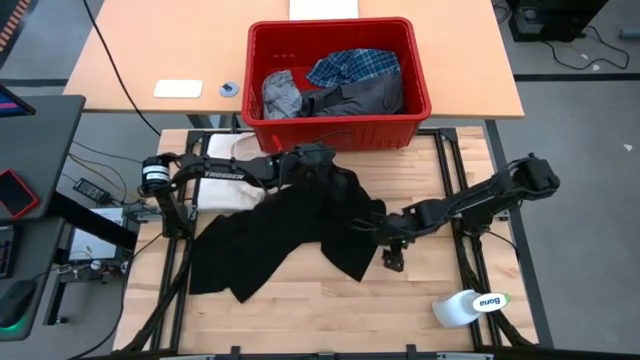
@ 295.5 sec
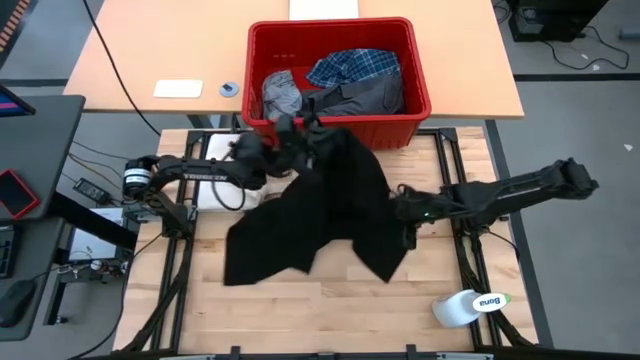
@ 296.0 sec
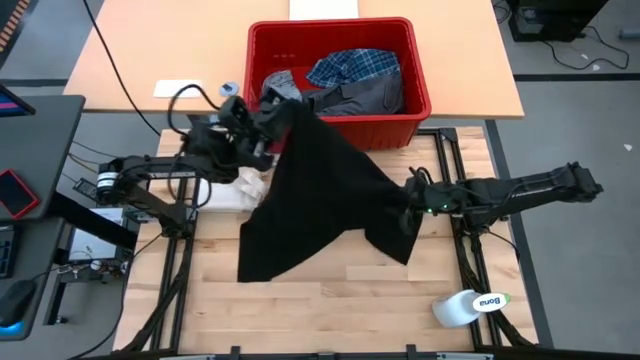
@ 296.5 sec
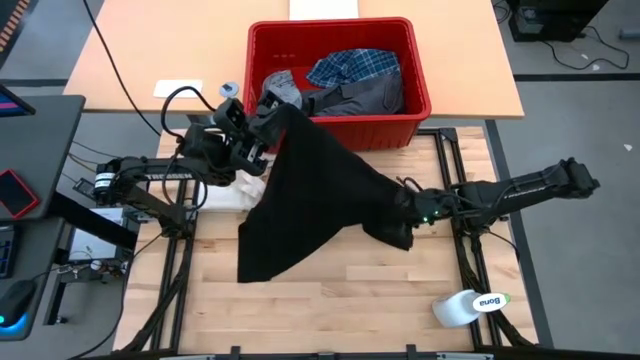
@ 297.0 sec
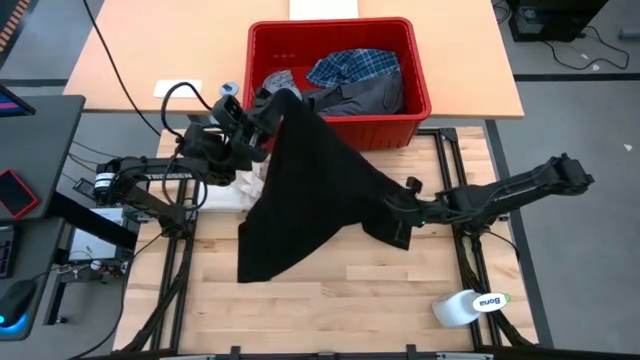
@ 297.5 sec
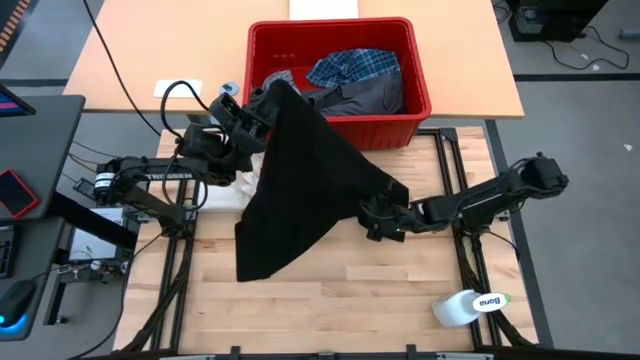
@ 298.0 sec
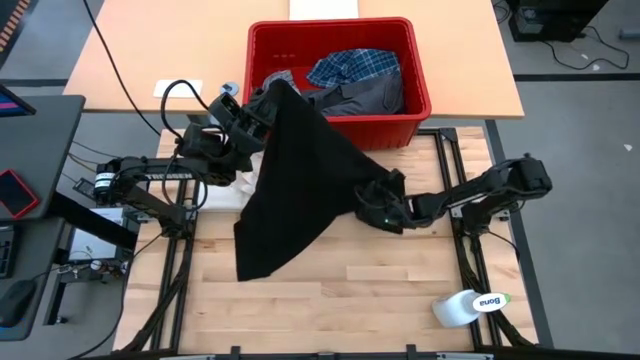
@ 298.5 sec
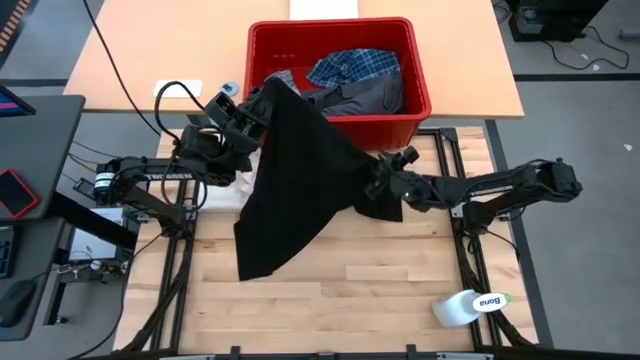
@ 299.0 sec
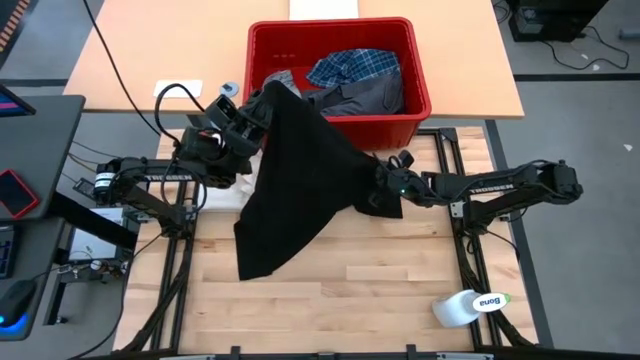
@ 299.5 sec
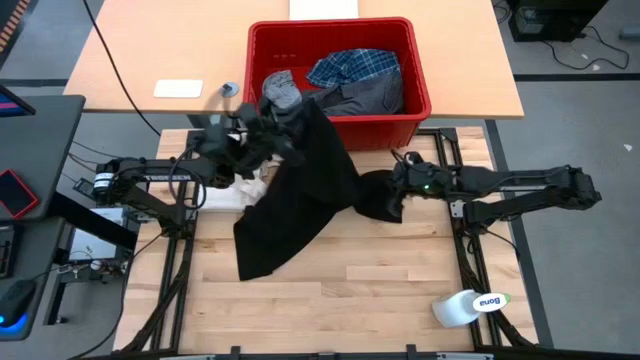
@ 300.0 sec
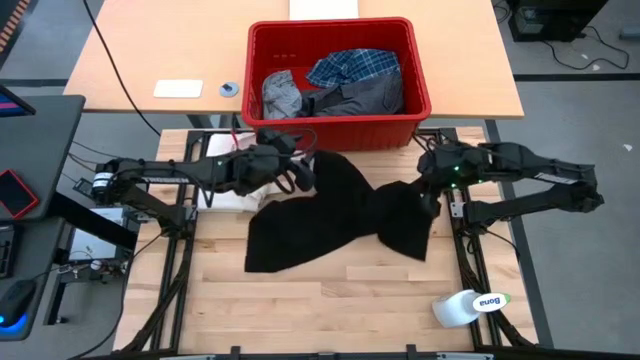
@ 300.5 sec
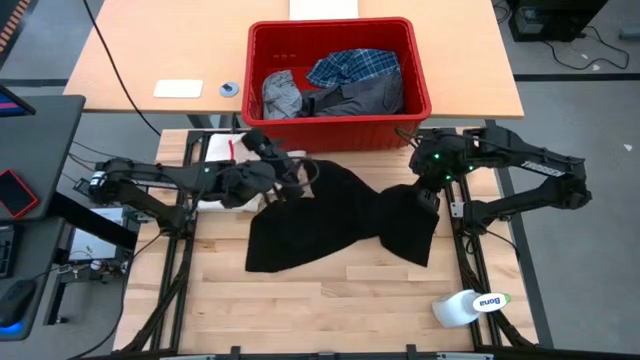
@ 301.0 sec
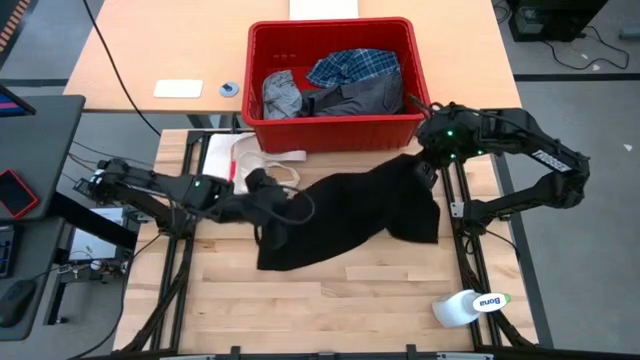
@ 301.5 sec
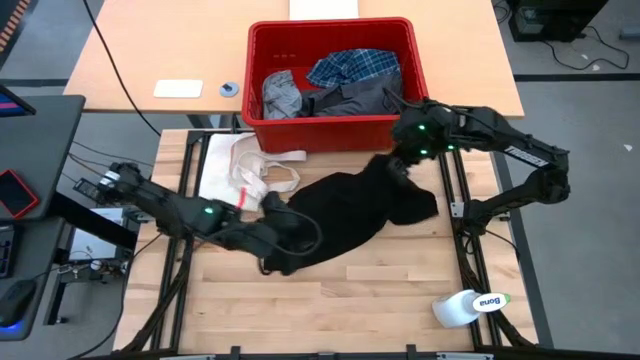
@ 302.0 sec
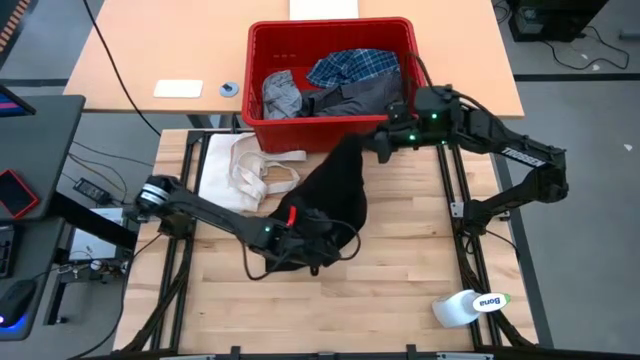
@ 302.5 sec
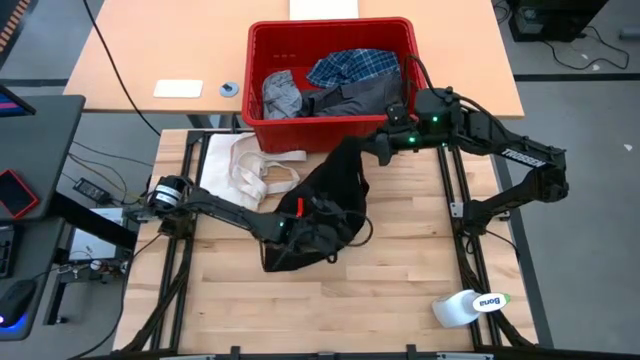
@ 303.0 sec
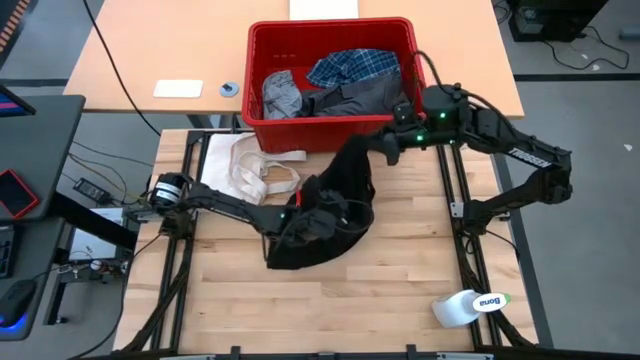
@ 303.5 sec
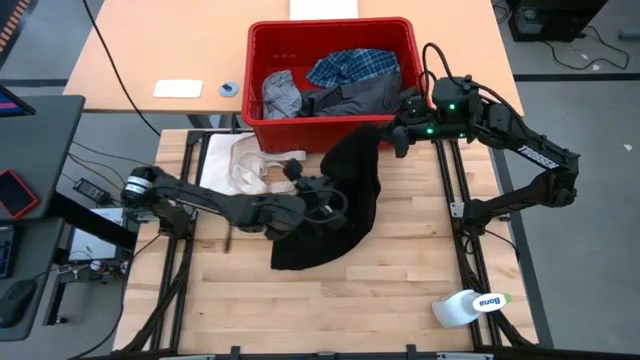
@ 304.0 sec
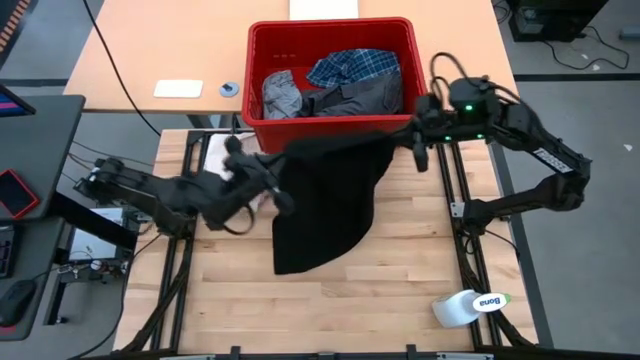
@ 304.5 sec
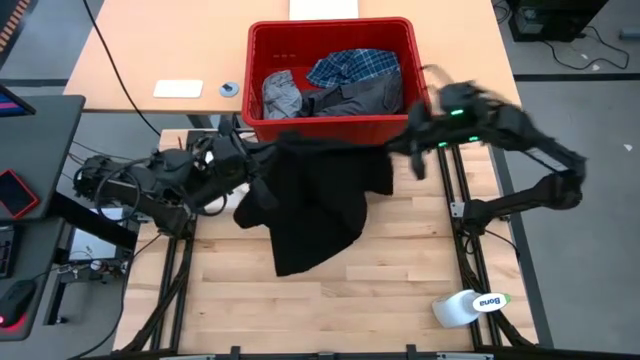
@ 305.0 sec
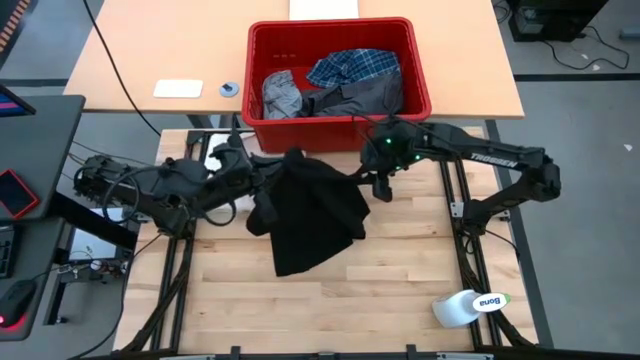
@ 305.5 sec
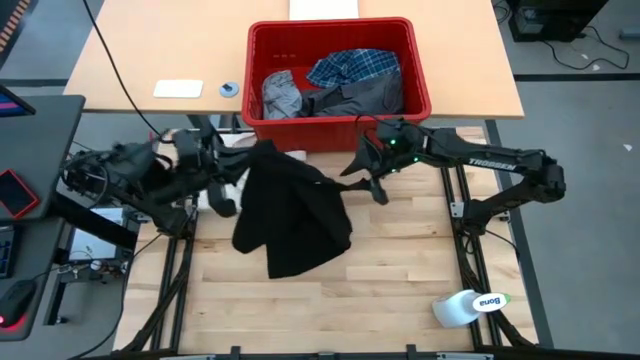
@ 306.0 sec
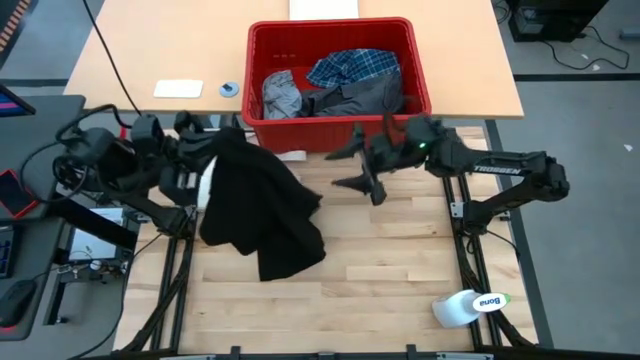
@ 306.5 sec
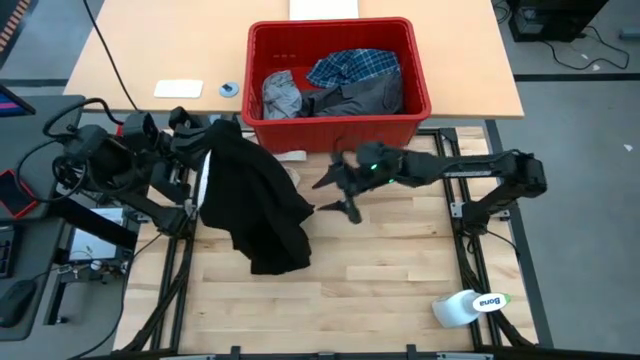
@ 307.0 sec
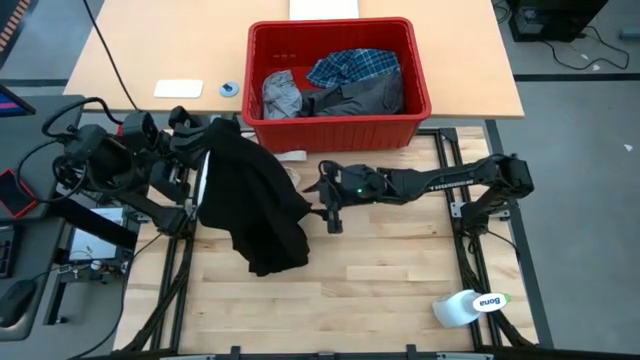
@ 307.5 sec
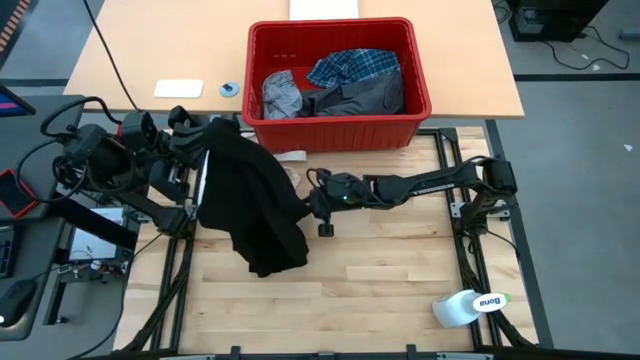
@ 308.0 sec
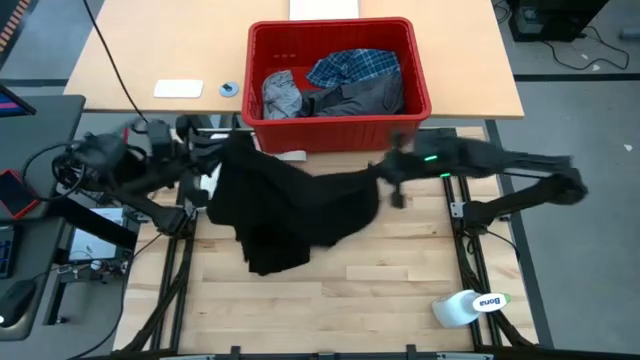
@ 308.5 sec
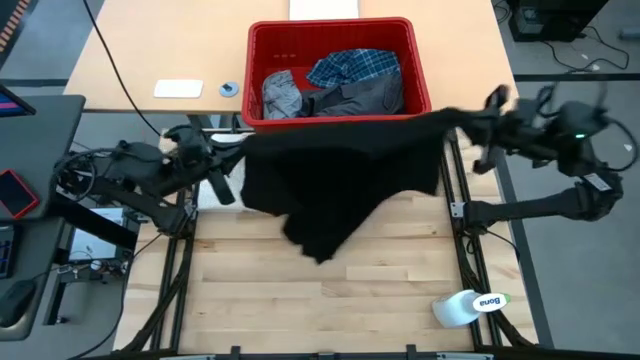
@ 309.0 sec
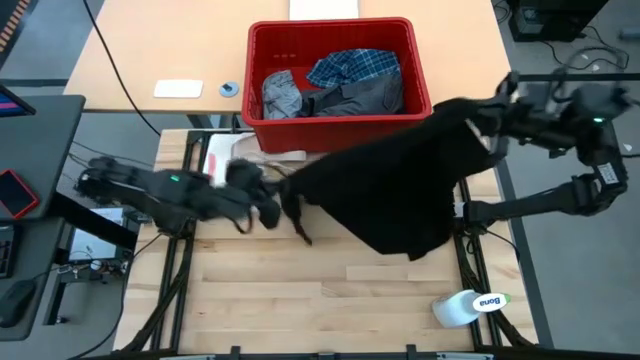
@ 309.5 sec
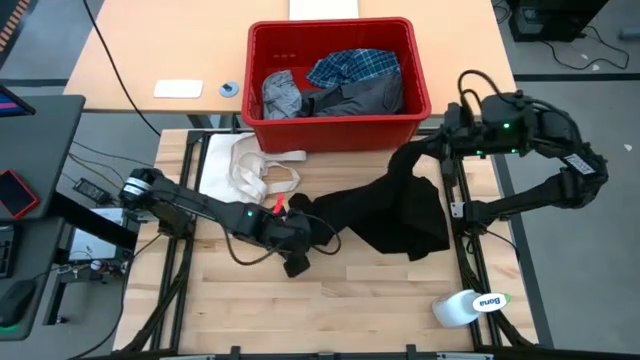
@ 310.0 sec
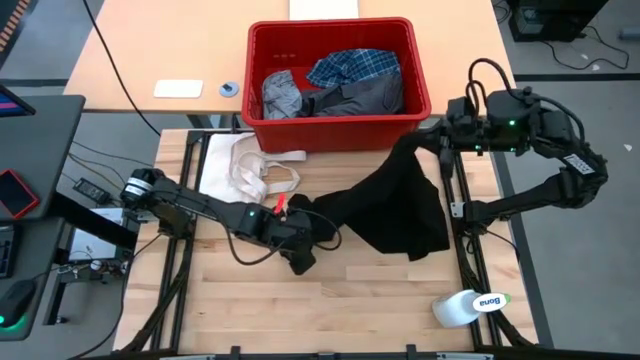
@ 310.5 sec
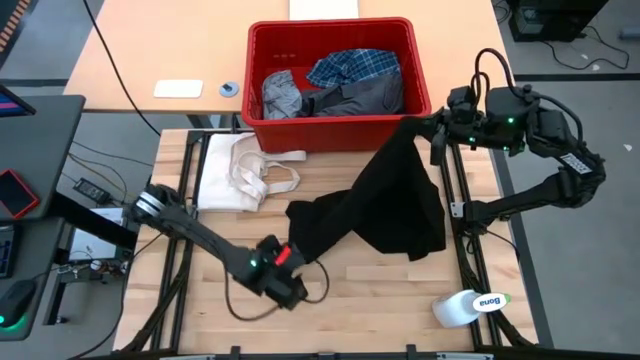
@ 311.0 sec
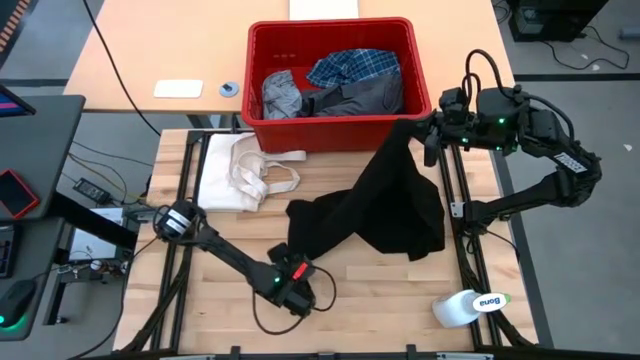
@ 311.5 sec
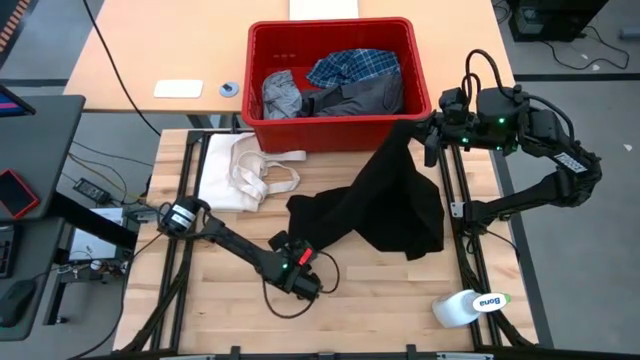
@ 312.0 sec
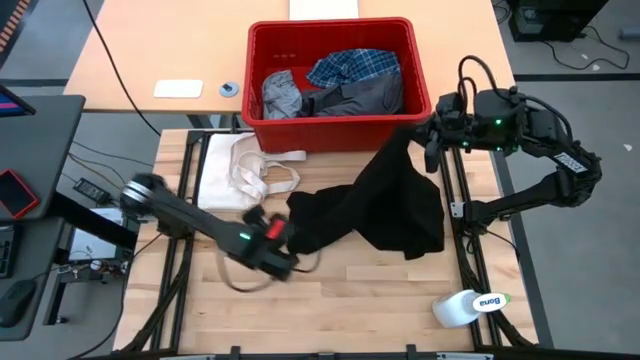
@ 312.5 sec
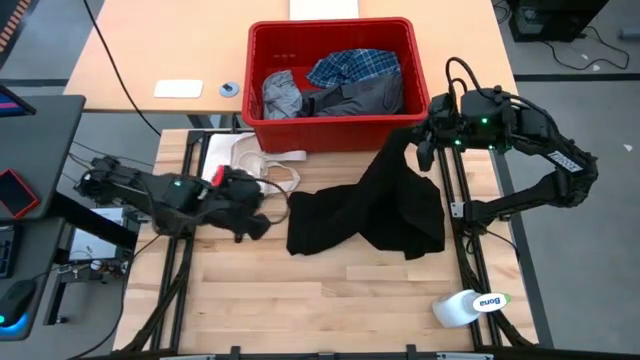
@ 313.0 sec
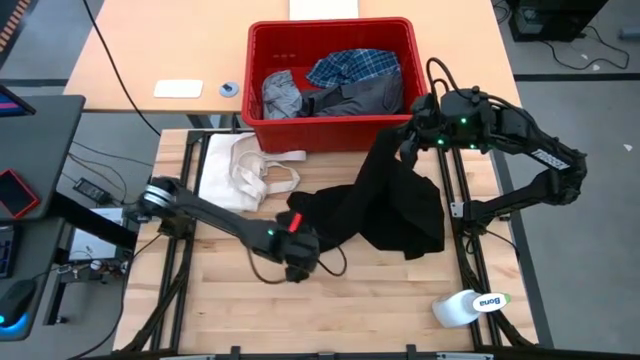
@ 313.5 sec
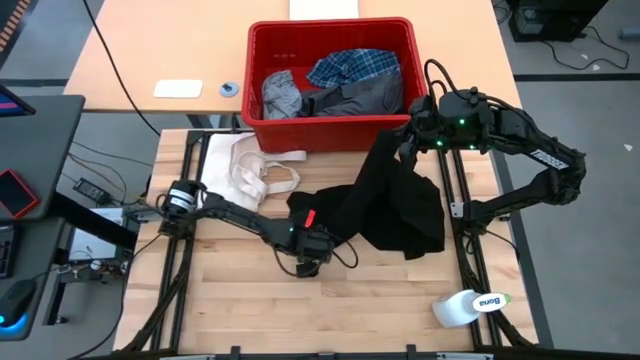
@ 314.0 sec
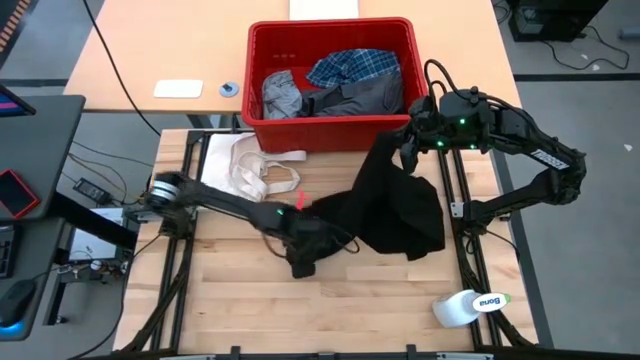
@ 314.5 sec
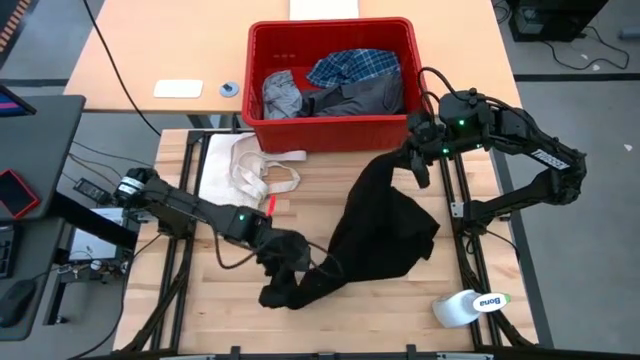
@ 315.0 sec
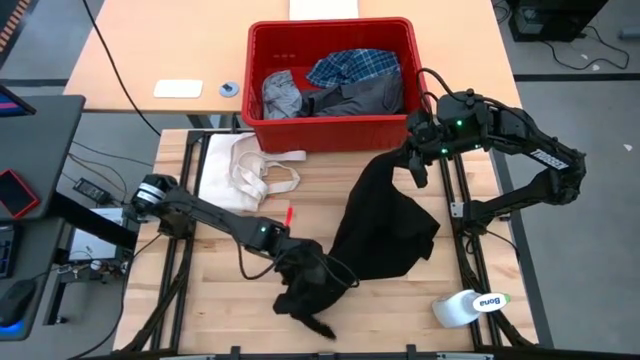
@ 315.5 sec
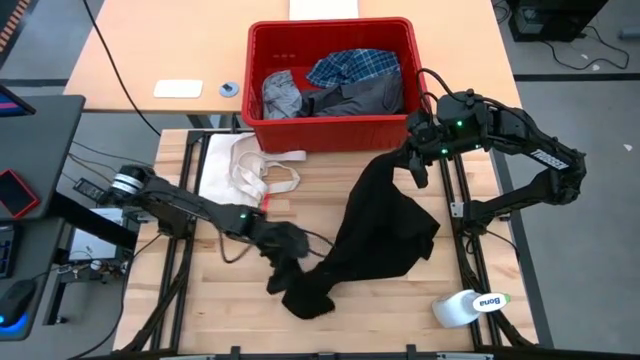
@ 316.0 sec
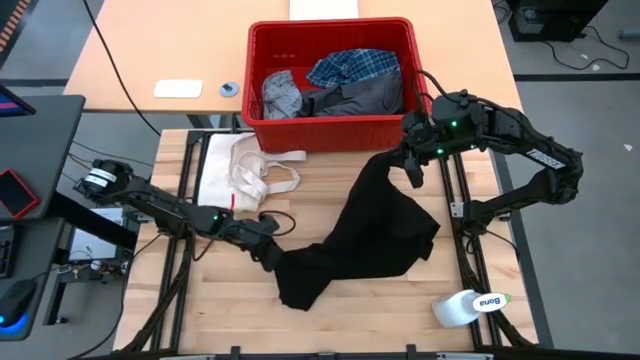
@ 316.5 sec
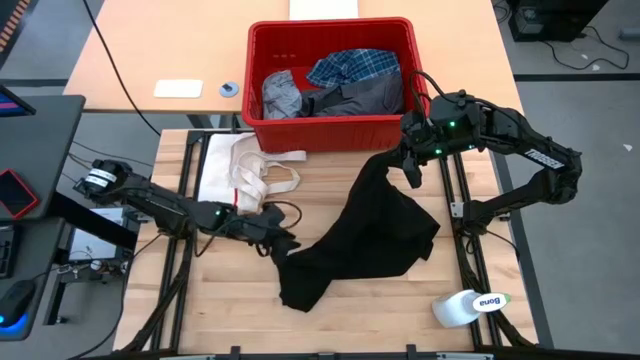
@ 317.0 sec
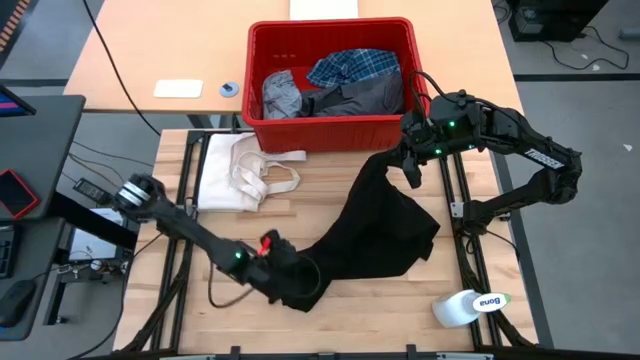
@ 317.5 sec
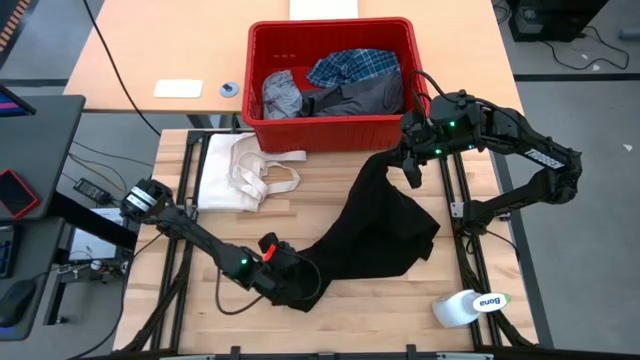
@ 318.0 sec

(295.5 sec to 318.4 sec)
Task: Fold Laundry from Bin
Fold the black shirt
